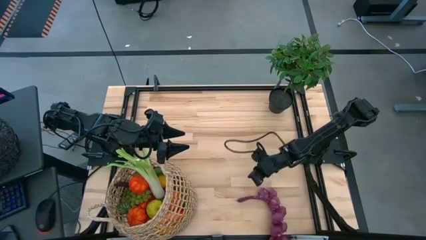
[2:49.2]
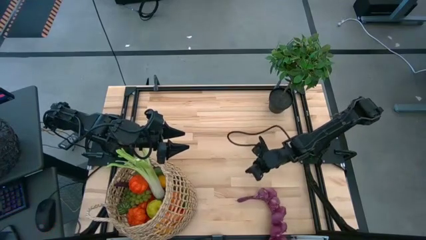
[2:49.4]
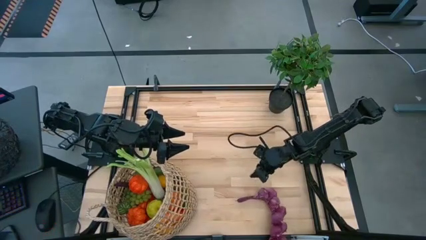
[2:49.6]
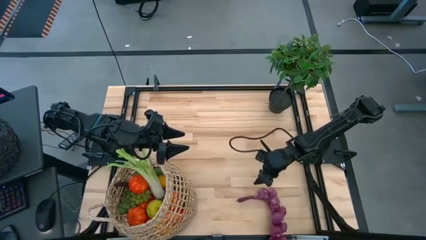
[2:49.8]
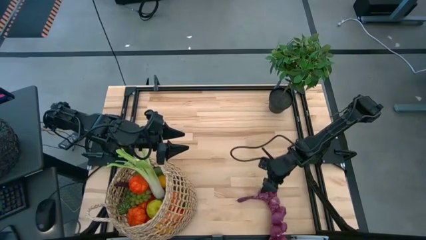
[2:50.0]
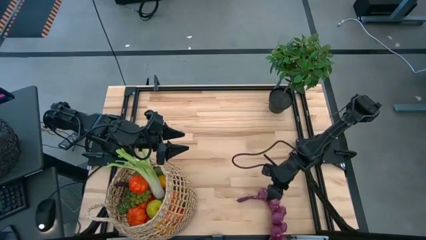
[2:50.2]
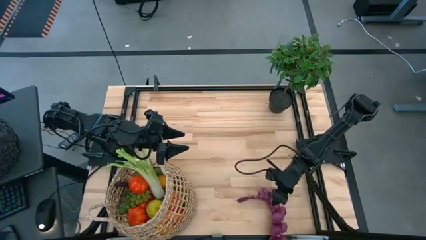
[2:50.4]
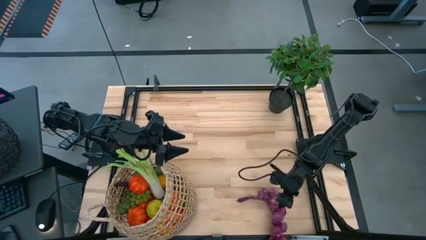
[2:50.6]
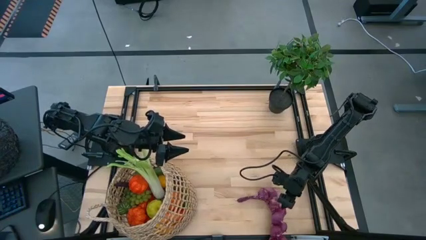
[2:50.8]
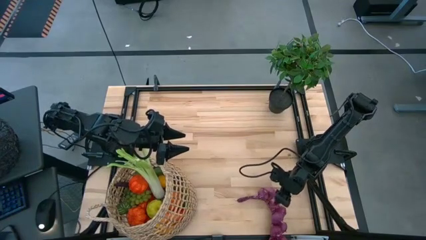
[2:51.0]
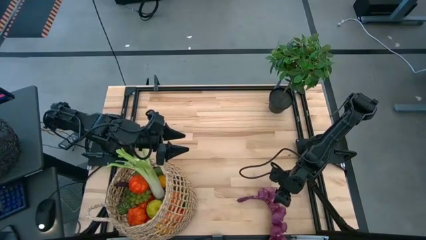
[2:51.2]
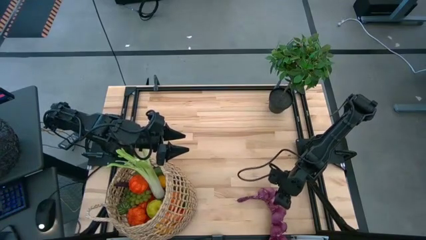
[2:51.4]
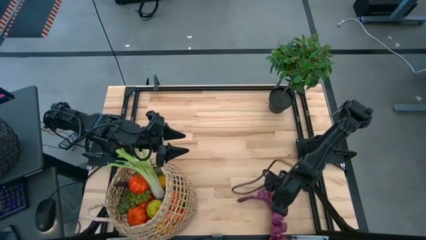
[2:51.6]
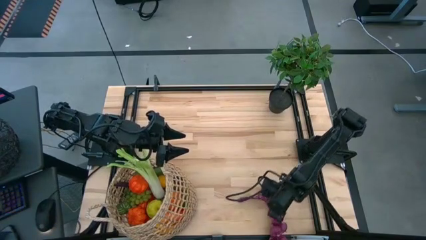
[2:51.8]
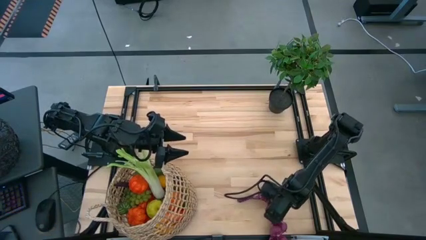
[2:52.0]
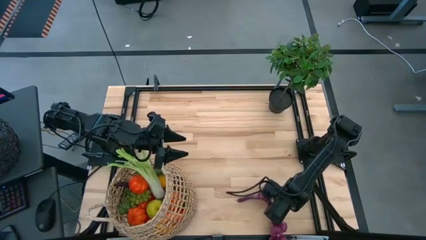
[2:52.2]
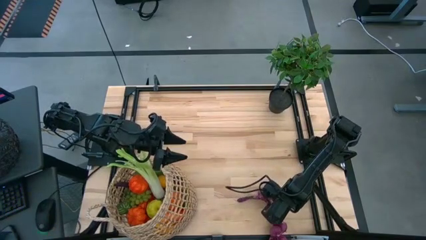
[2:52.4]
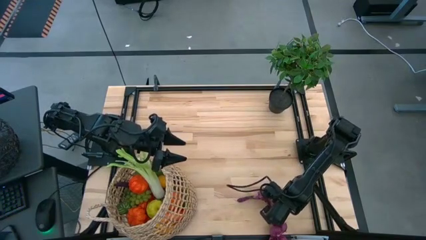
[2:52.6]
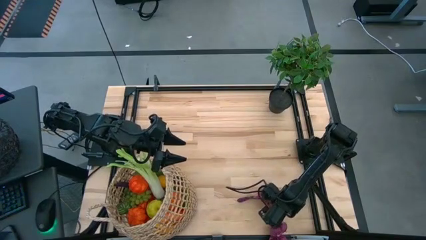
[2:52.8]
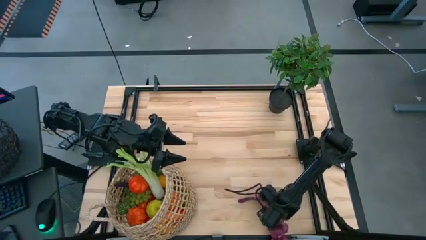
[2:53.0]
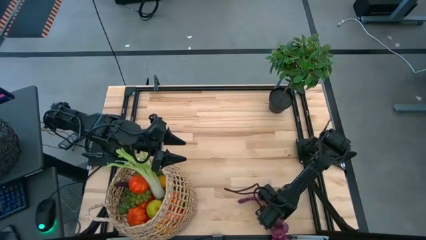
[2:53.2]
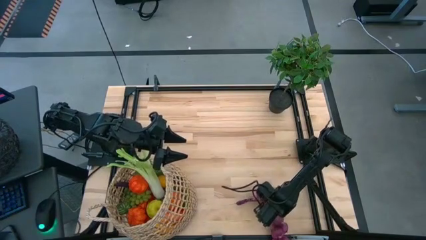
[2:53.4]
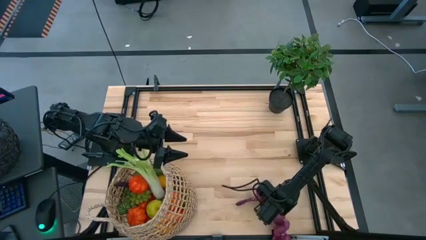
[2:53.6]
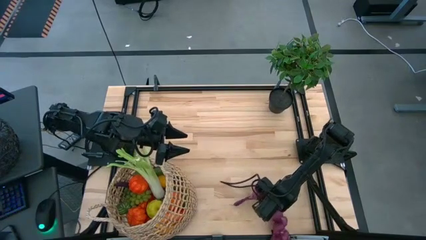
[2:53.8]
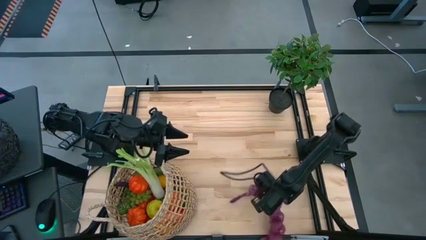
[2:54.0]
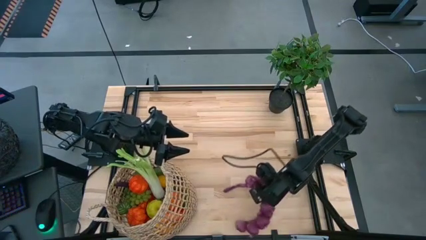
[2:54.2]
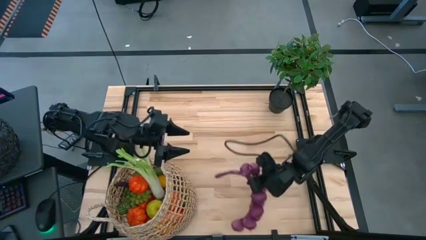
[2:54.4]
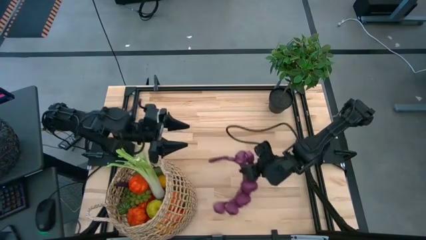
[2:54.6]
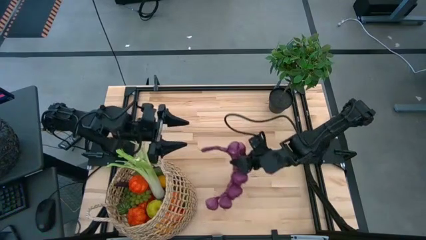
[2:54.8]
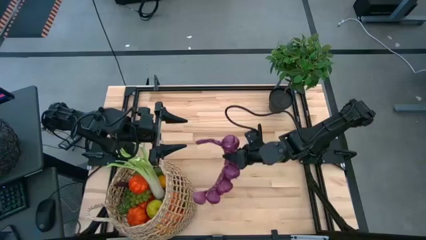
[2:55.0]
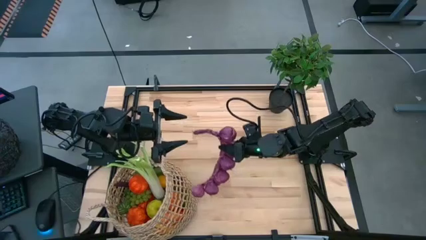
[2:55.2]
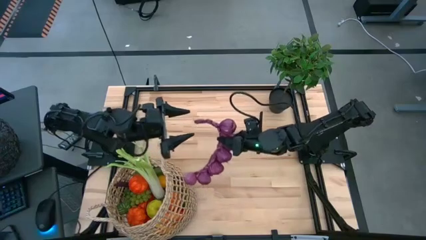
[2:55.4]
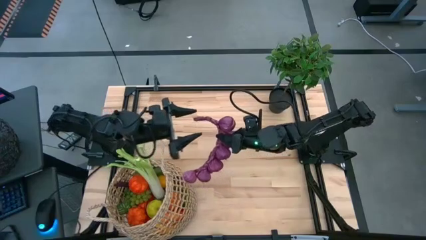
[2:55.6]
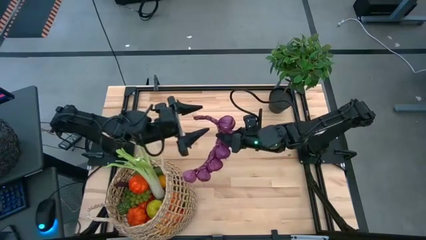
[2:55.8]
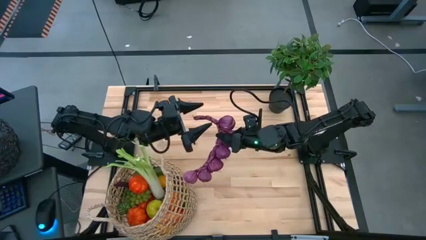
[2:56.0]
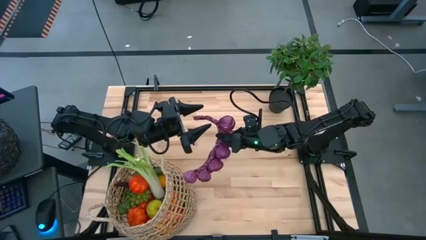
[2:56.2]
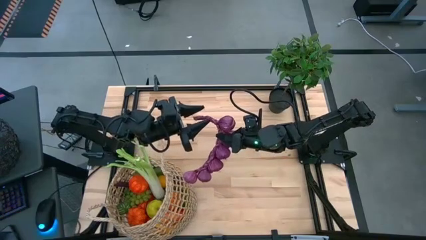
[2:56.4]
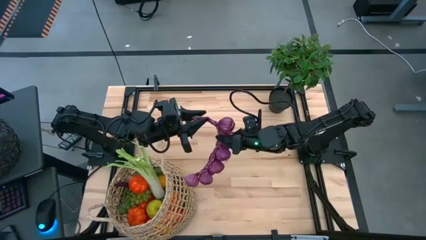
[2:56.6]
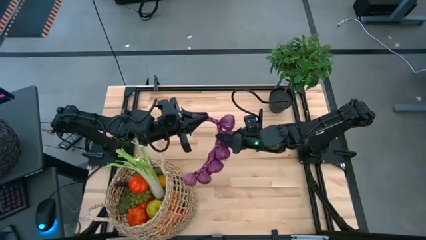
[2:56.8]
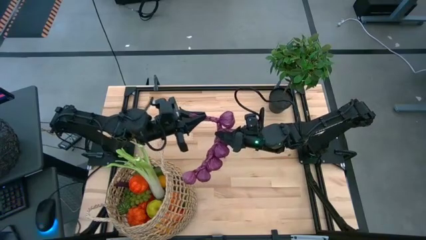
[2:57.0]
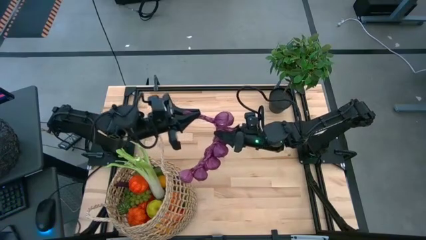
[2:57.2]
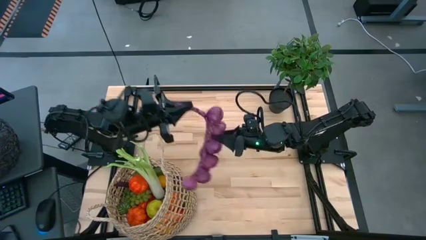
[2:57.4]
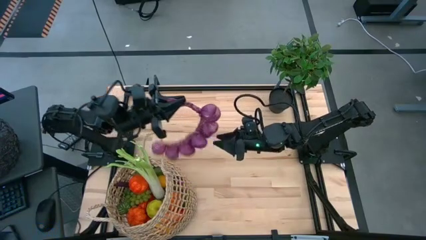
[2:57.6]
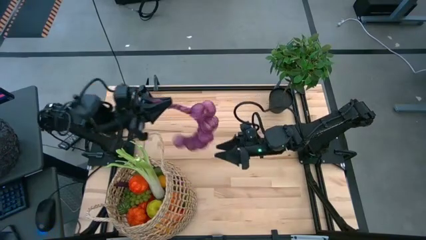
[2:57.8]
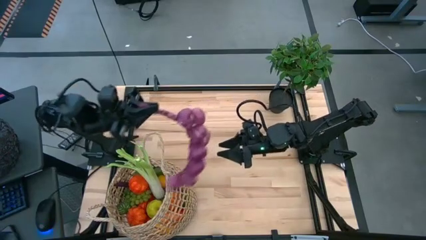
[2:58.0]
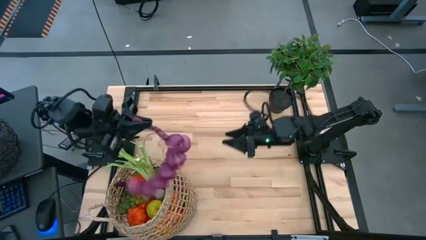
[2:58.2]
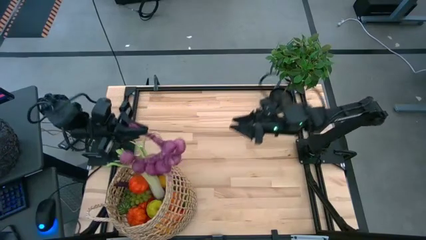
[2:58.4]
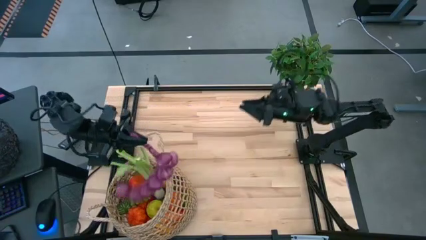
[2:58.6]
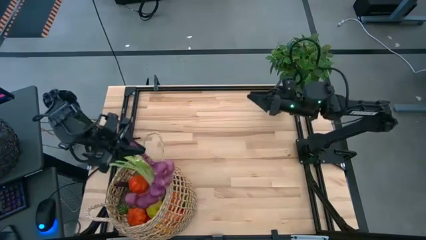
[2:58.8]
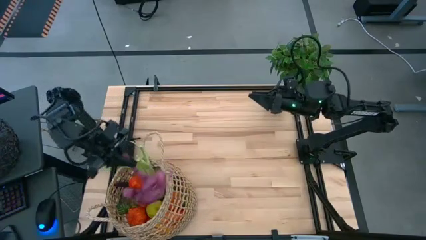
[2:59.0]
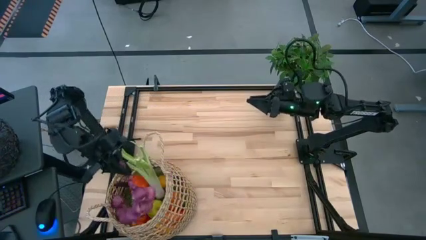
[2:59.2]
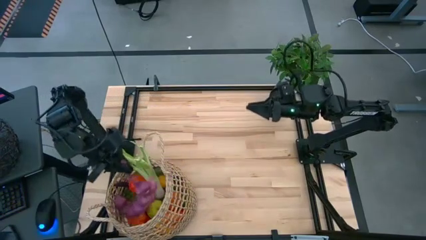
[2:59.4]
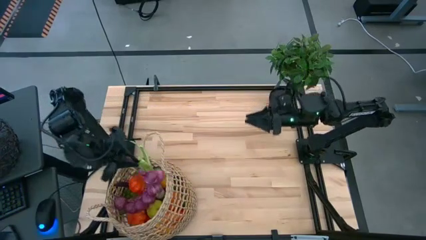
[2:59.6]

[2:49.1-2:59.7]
Task: Build produce basket
Put the purple garlic into the basket

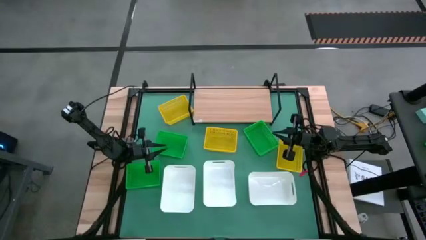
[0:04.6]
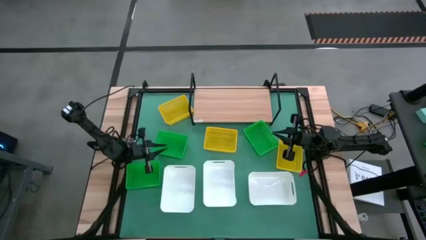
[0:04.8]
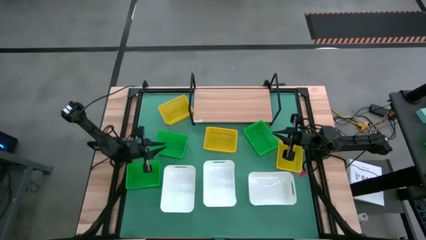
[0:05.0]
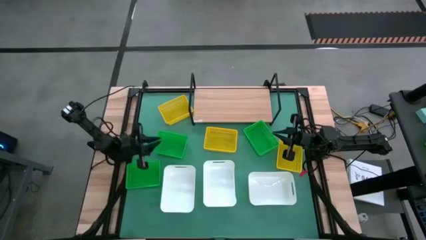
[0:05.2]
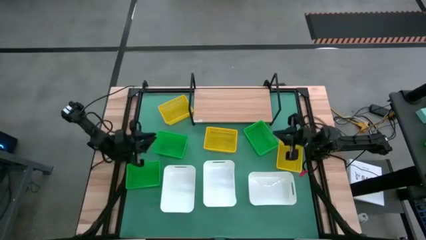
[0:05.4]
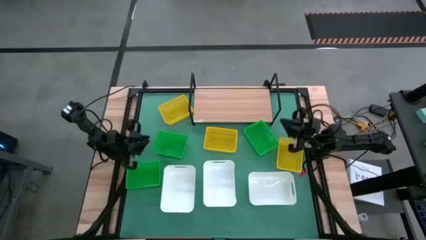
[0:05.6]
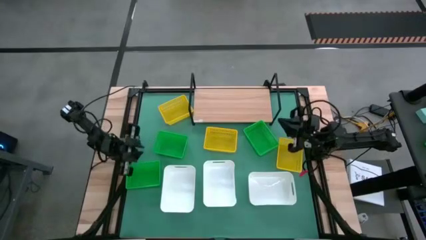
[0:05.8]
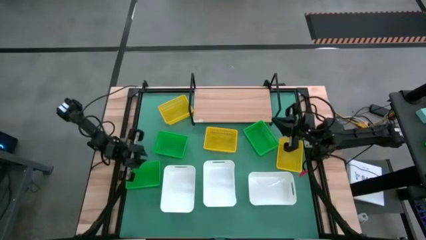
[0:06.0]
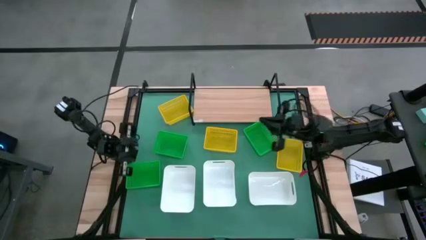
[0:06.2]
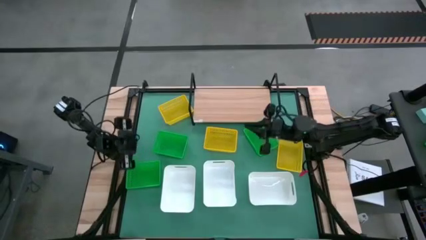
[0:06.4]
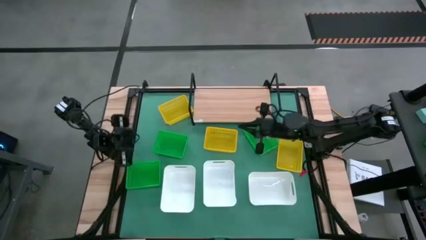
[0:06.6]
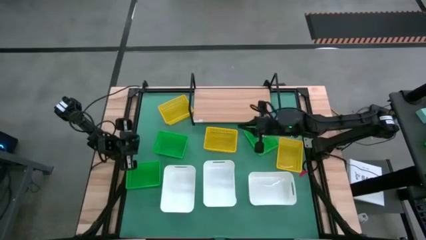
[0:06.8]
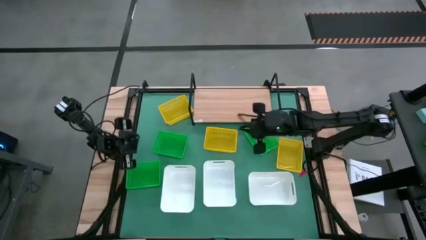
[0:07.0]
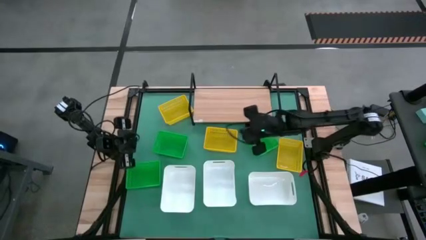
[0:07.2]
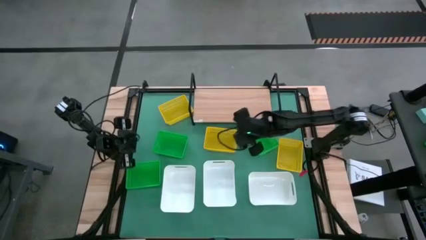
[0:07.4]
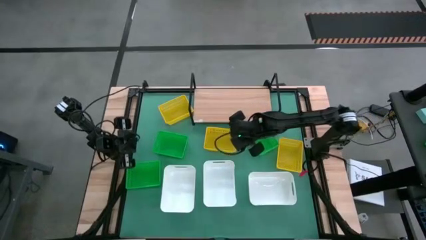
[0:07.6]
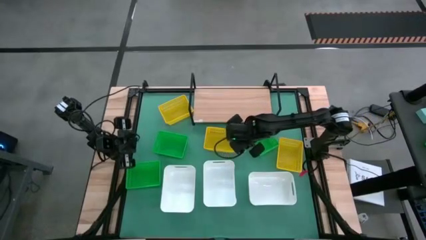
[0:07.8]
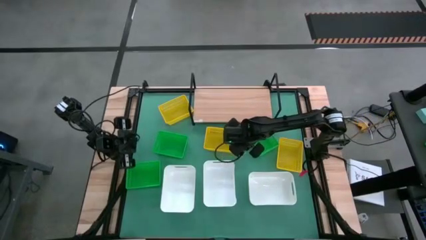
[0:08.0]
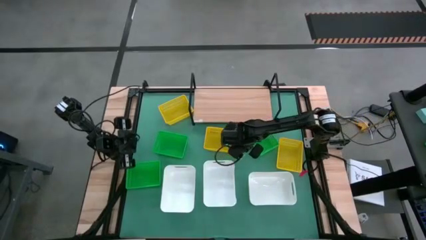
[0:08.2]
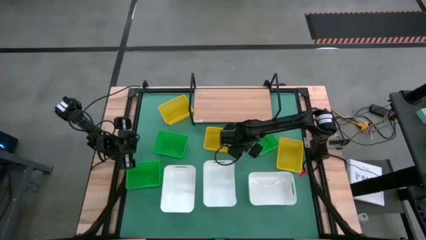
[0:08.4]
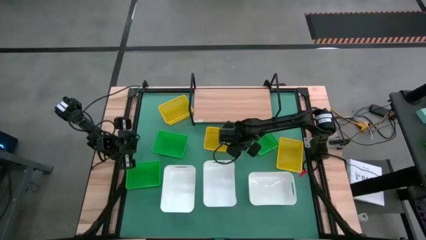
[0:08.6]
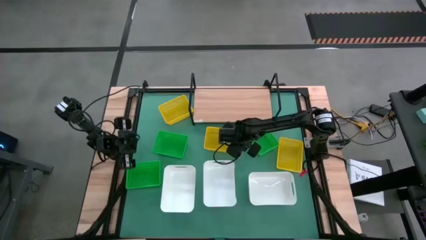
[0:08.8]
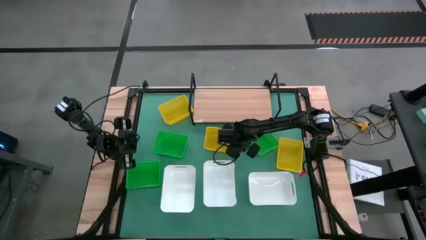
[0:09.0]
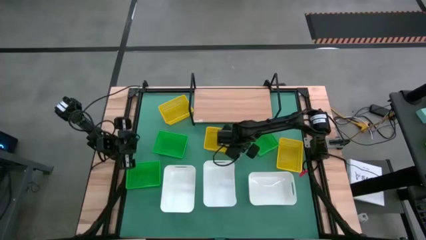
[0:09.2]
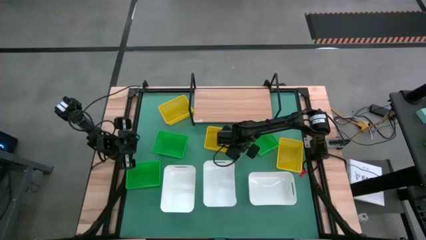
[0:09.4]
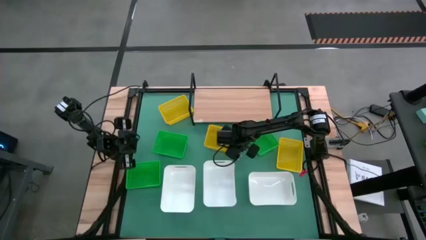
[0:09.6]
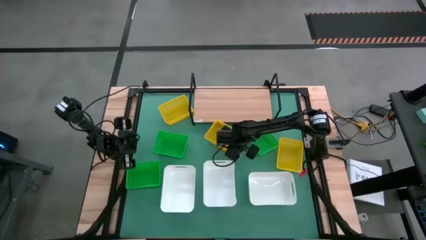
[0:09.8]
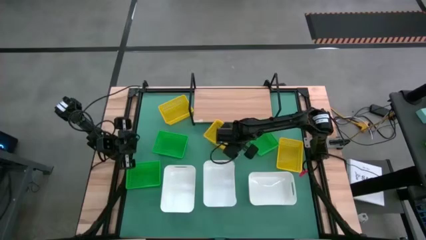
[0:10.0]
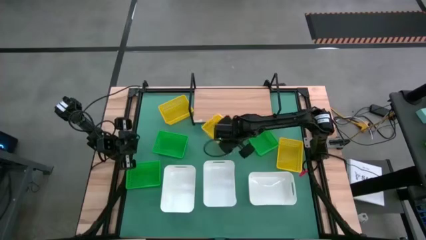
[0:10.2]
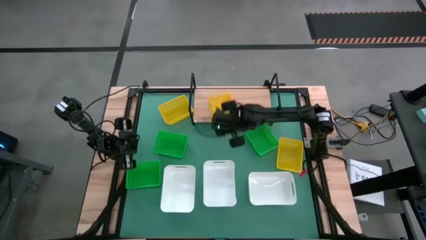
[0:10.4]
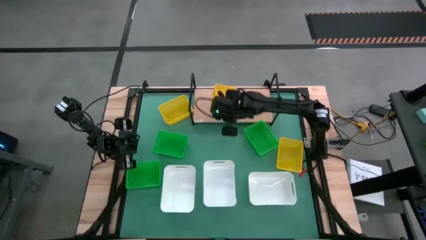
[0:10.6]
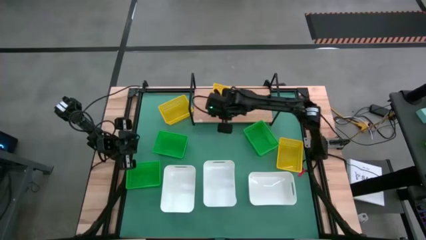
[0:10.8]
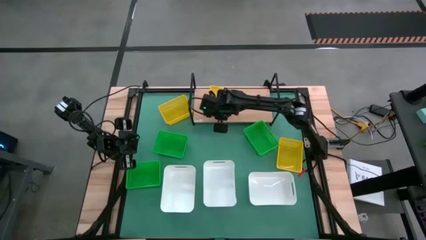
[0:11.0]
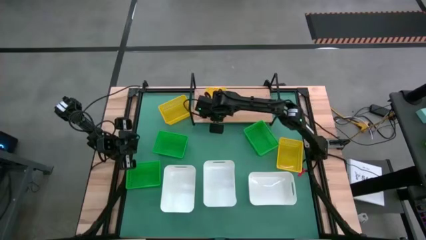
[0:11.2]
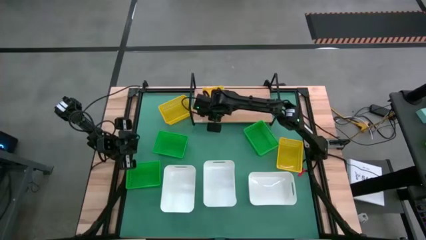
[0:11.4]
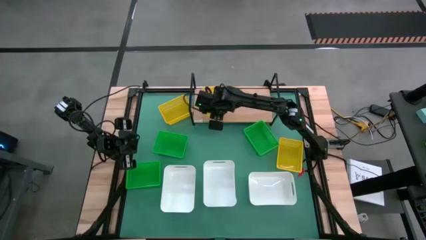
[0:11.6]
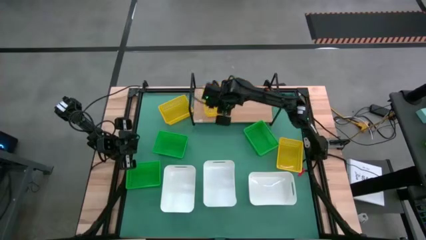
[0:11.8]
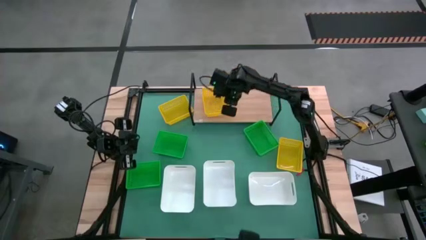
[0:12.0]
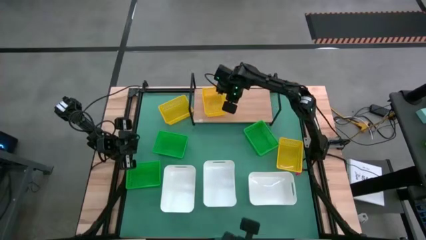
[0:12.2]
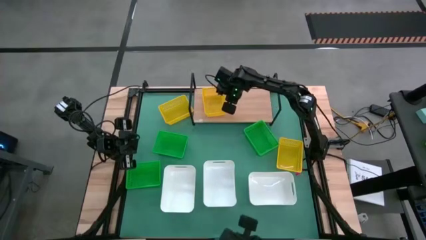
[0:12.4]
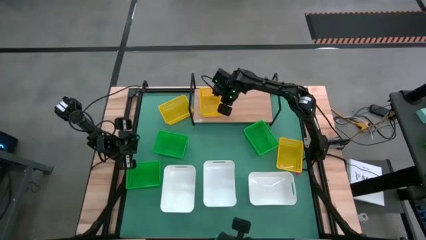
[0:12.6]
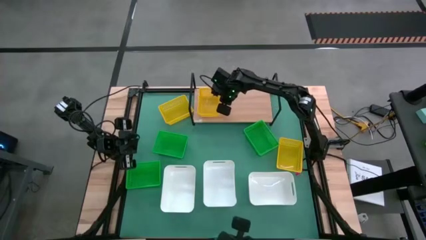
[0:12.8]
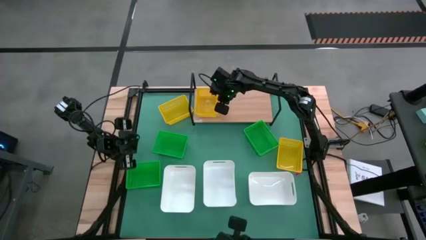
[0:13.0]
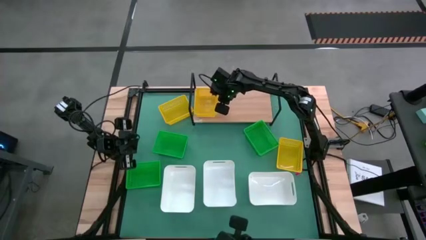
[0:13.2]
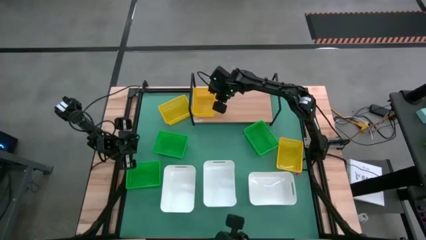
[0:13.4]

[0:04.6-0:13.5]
Task: Stack baskets on shelf by color
Put the bottom left yellow bin on the shelf
